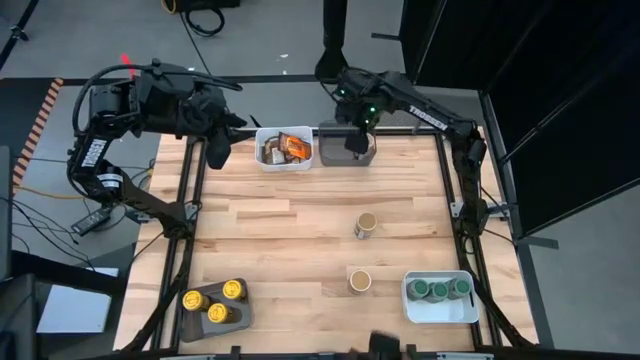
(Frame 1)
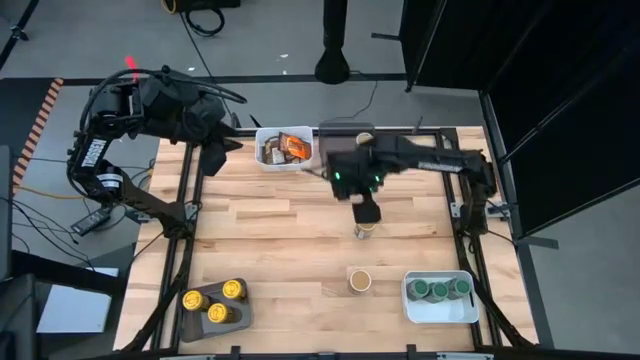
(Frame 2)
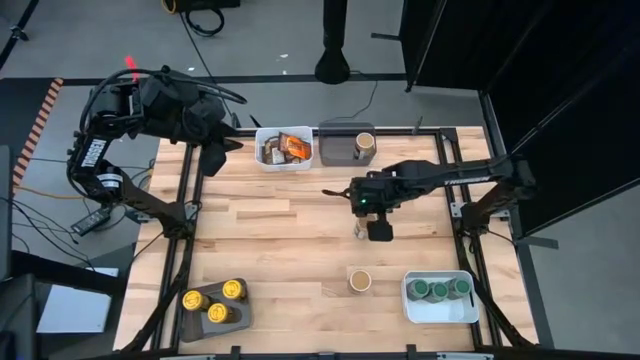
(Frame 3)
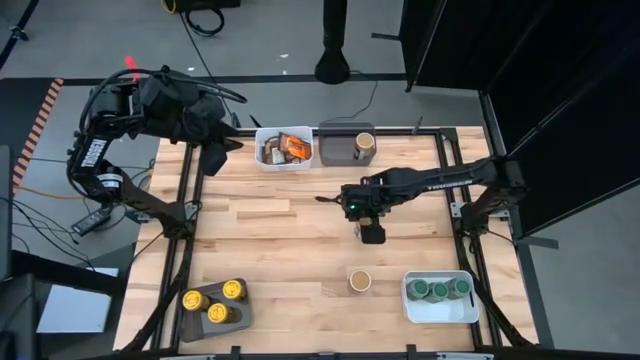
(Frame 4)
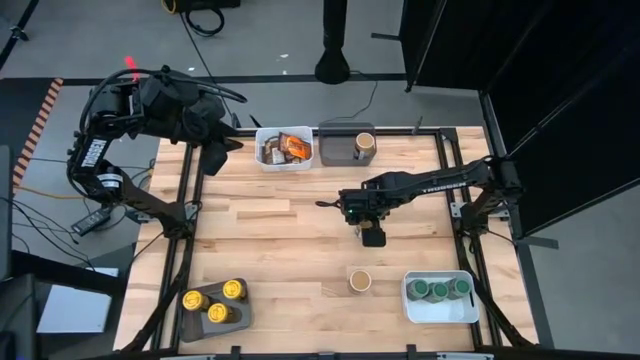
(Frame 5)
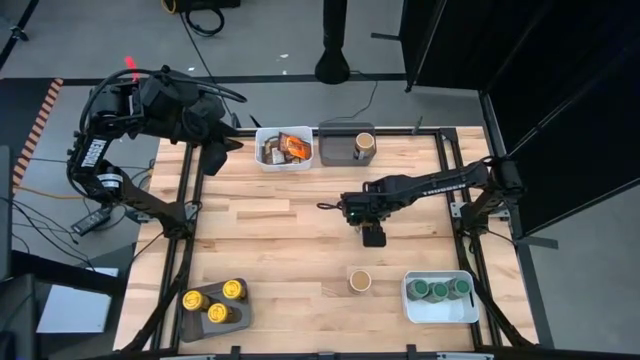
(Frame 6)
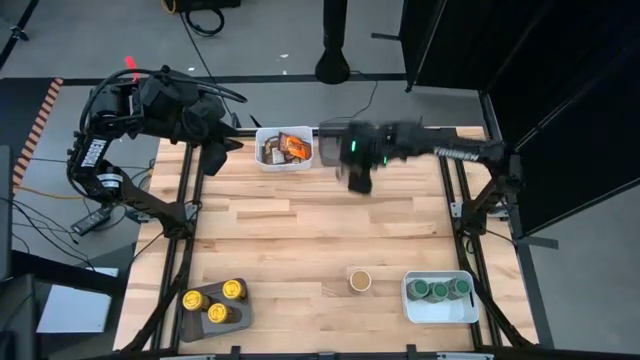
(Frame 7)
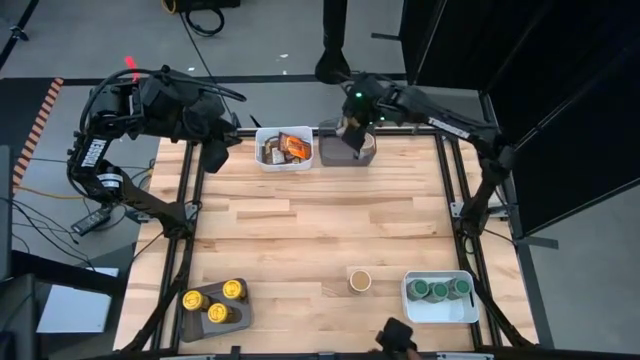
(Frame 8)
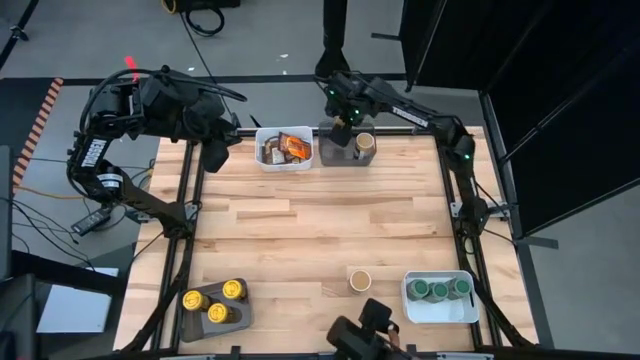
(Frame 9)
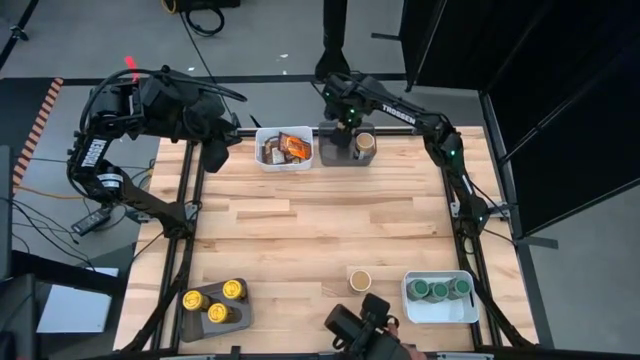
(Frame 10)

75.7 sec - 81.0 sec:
Task: Sort spices by type
Put the brown seasoning bottle into the top black bin

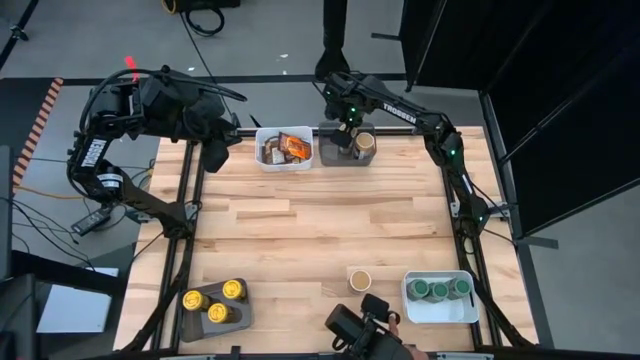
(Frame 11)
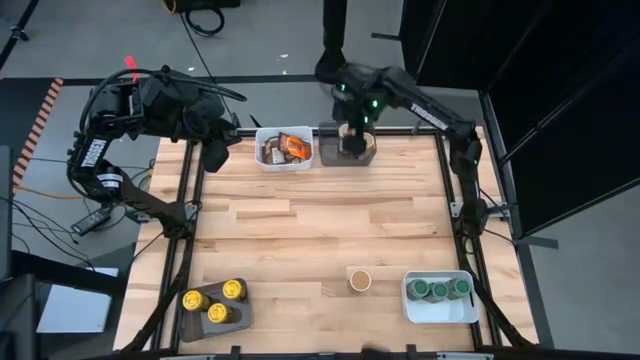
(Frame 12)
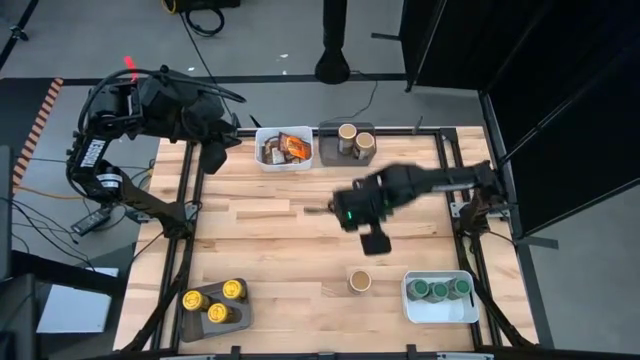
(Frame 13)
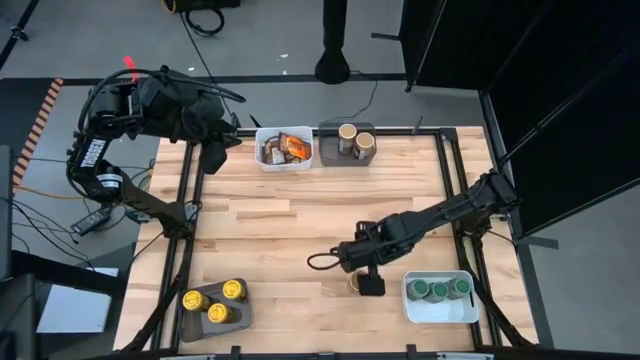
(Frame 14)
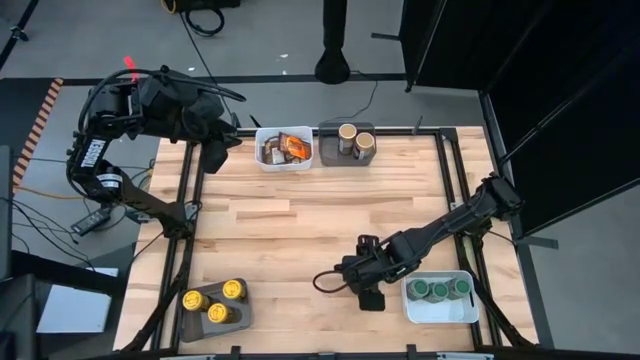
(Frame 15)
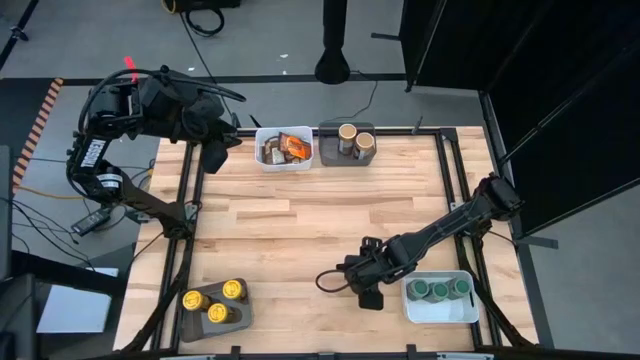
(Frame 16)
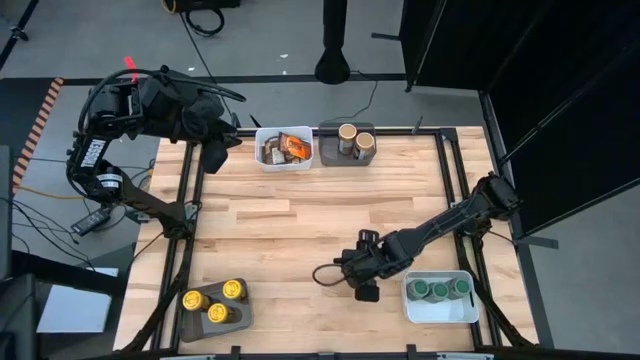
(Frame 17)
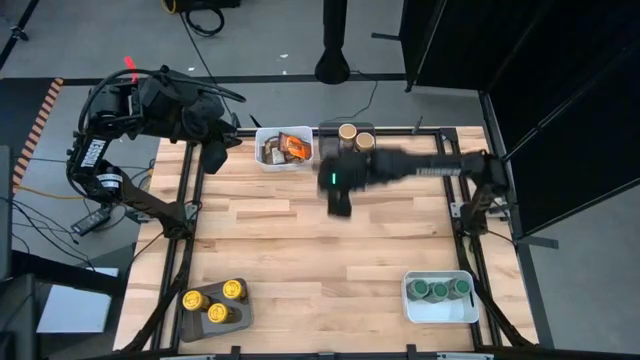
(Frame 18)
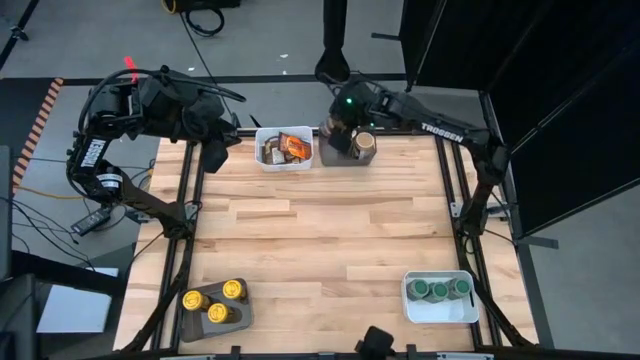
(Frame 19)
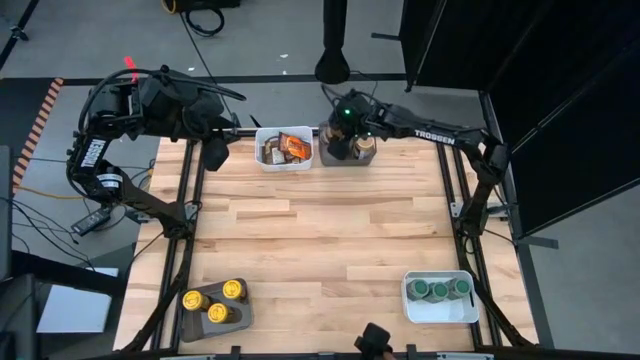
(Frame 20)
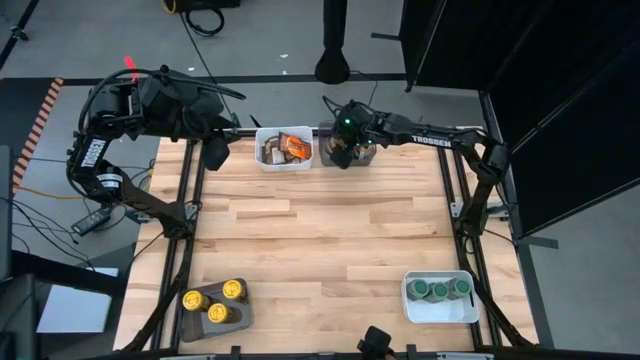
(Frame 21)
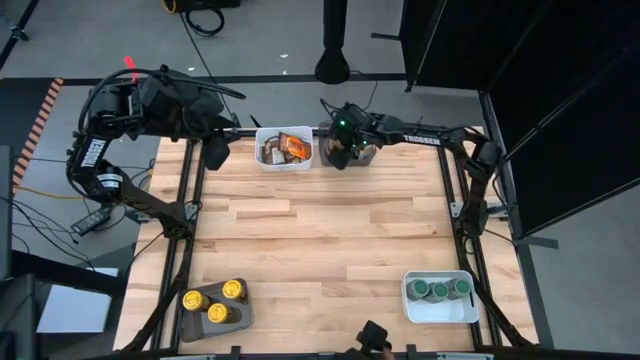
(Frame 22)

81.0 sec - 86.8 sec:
Put the brown seasoning bottle into the top black bin

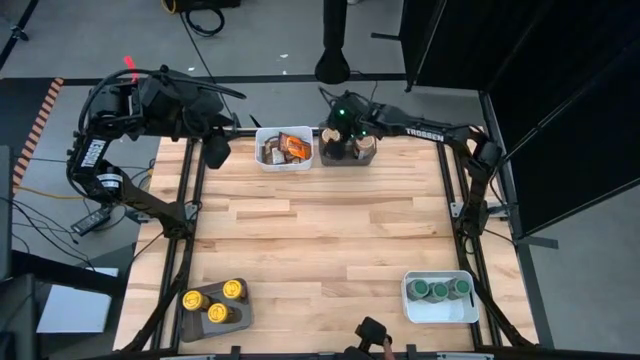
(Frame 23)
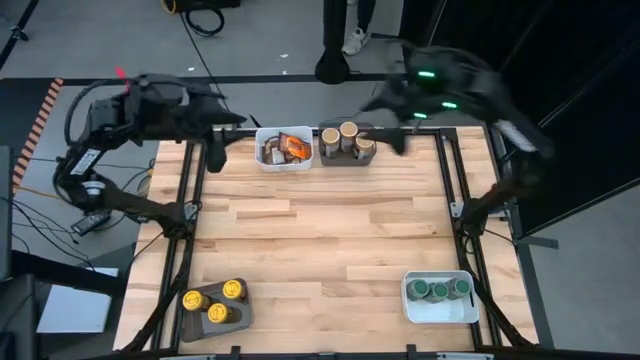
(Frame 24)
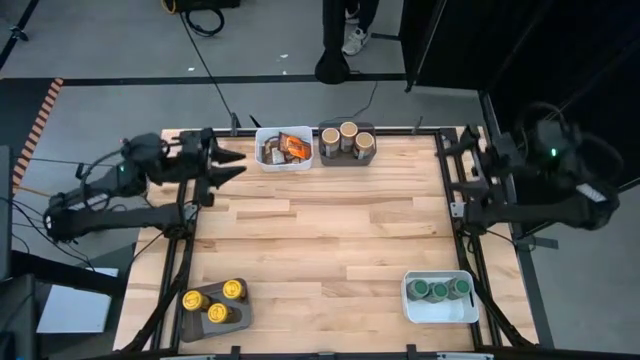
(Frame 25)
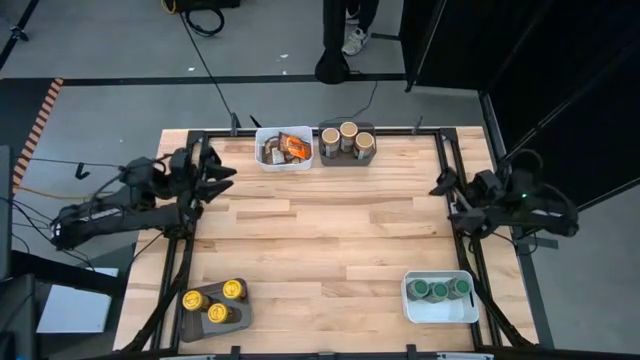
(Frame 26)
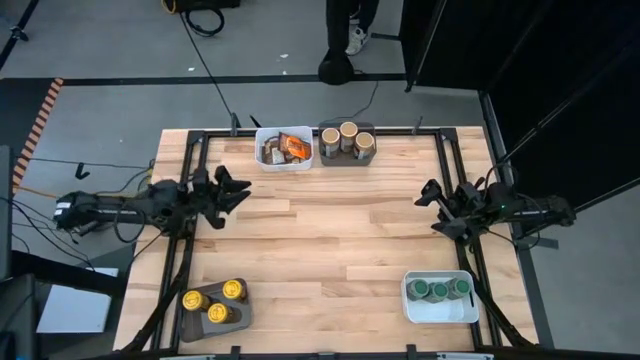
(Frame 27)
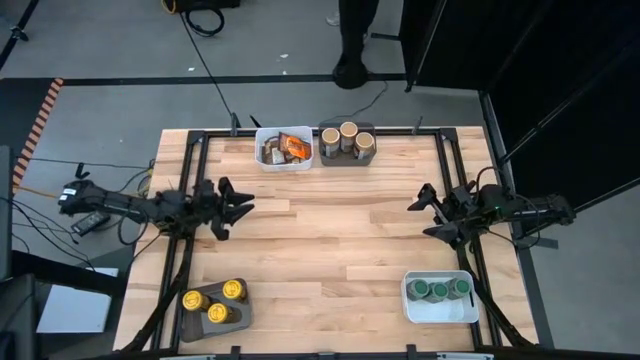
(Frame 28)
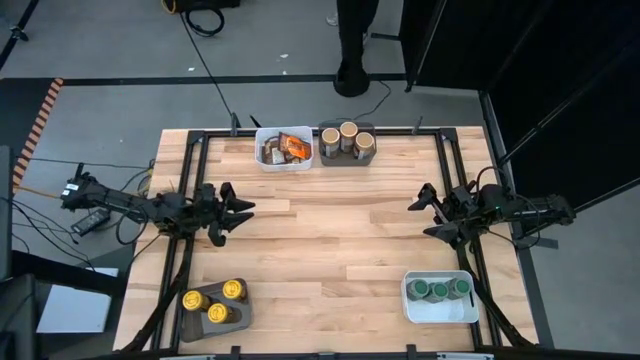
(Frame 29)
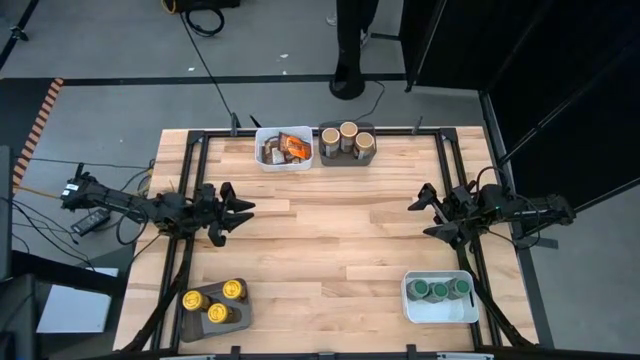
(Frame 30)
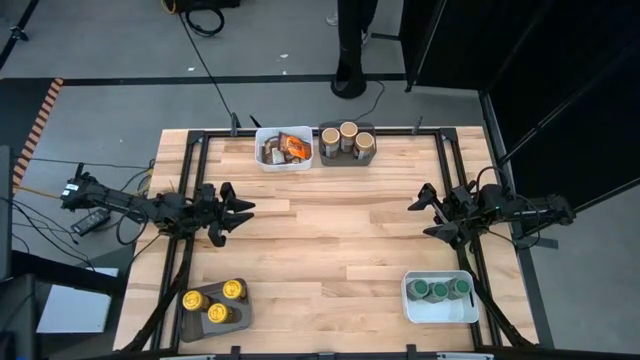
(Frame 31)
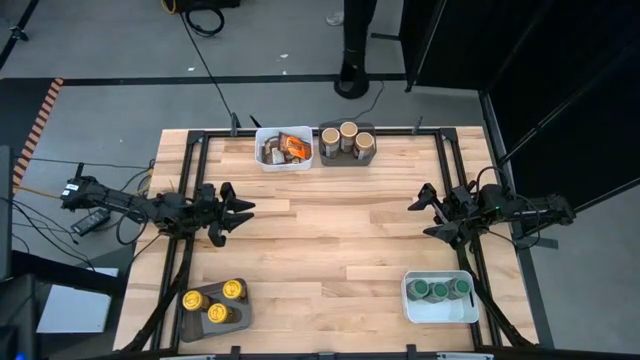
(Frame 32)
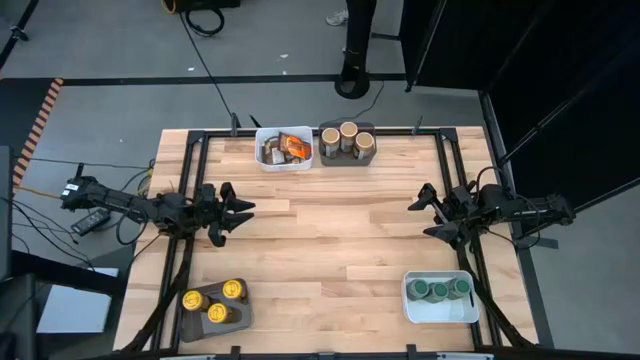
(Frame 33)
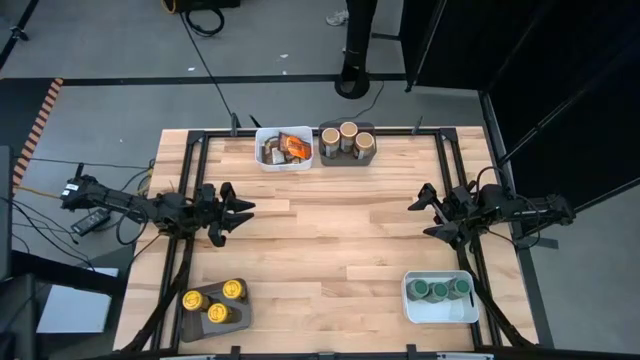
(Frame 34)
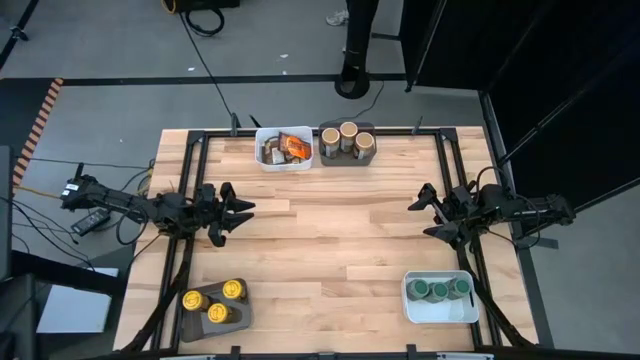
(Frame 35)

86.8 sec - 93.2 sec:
Return to Home Position

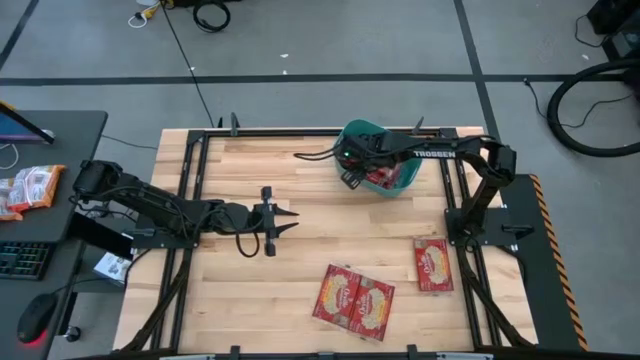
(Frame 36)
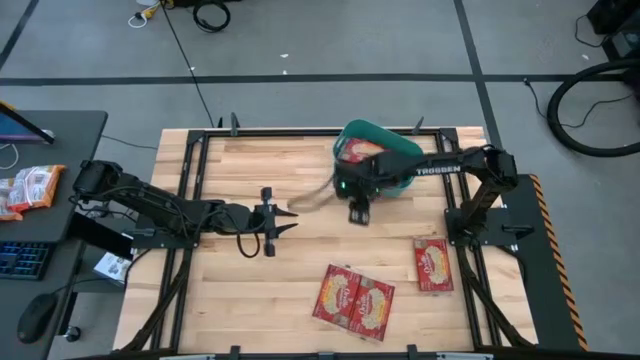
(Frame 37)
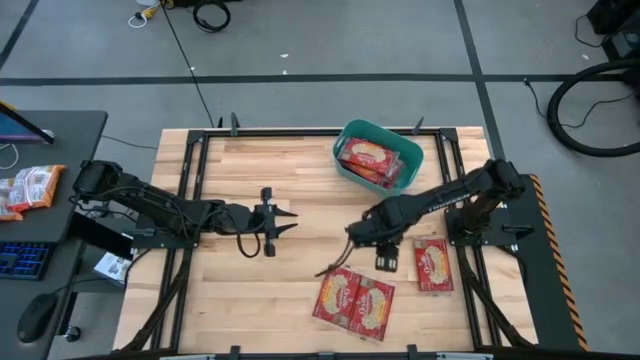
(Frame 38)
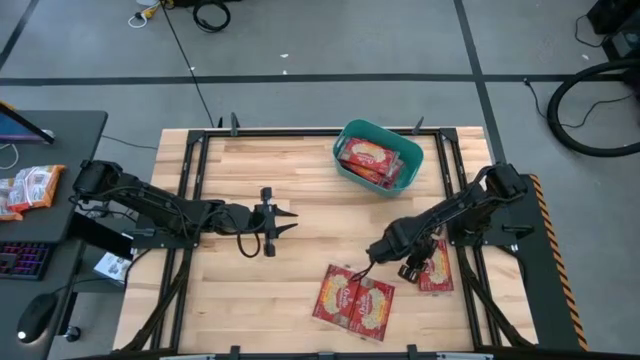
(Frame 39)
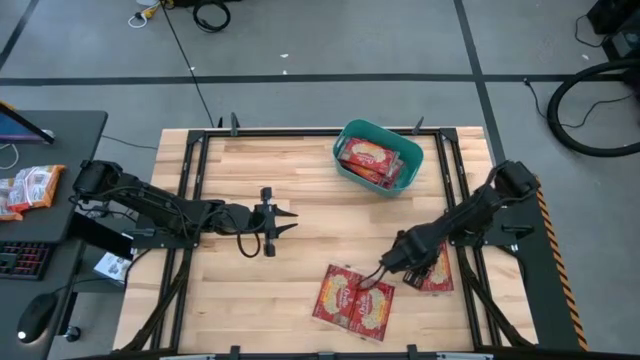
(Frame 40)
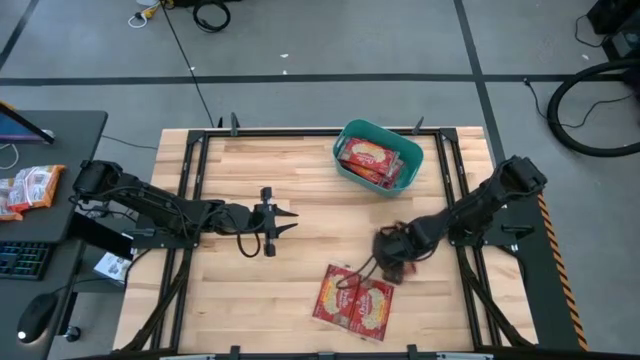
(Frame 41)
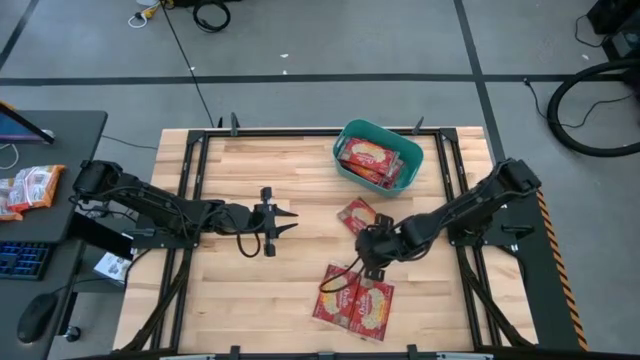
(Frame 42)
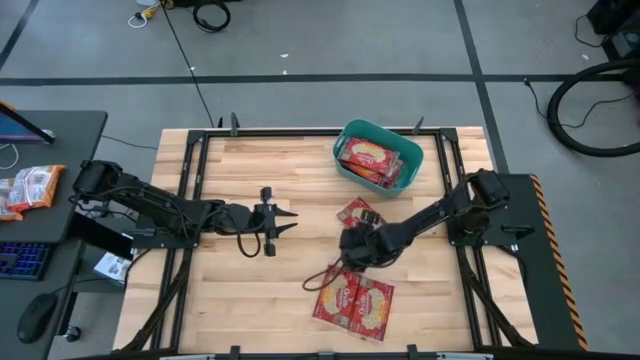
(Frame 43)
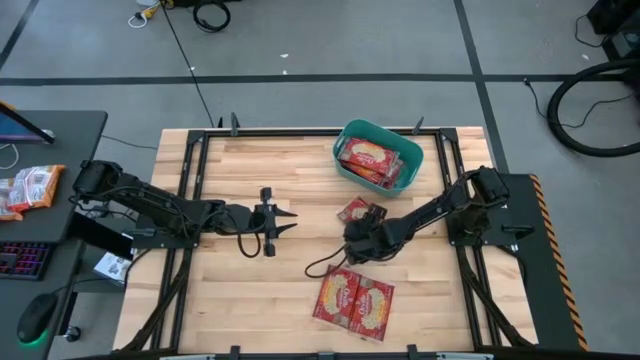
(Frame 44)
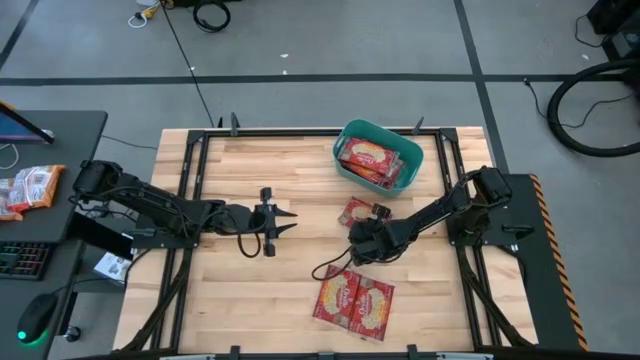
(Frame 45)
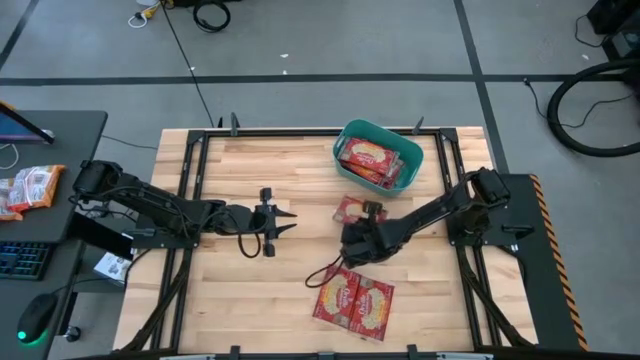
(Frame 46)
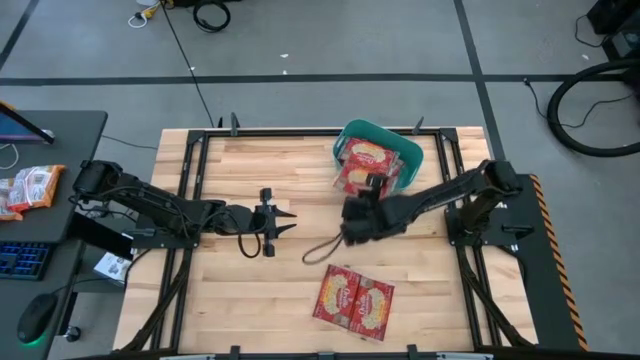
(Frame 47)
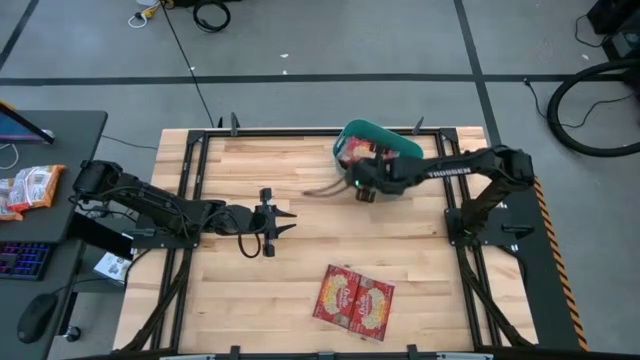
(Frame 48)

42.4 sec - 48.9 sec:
Task: Sort popcorn bags into baskets
Put the popcorn bag into the bin
